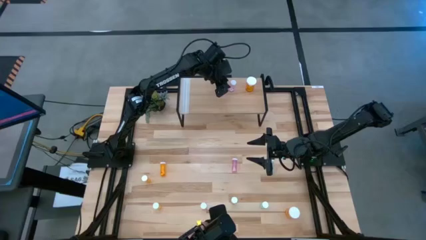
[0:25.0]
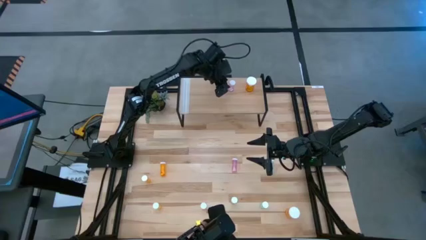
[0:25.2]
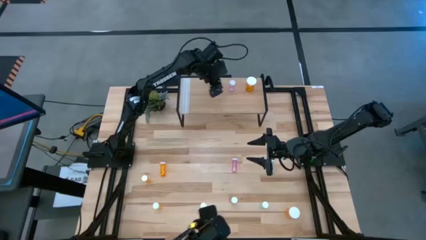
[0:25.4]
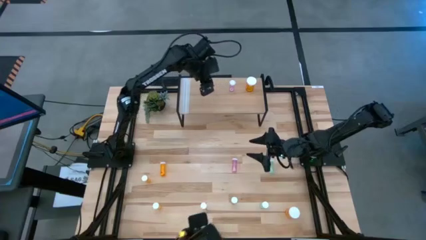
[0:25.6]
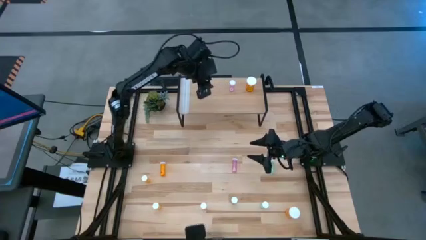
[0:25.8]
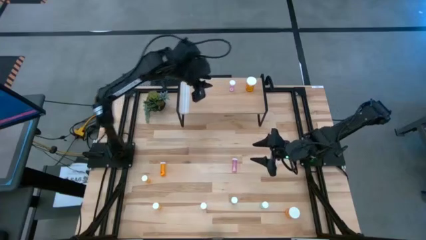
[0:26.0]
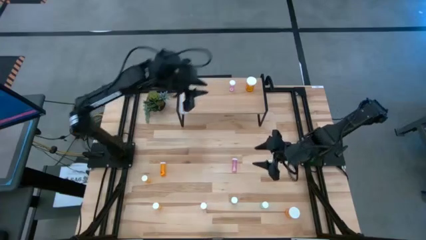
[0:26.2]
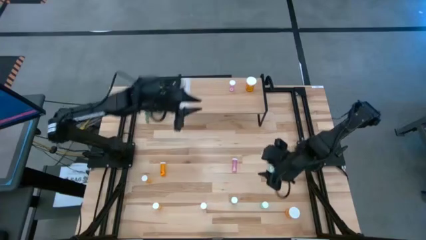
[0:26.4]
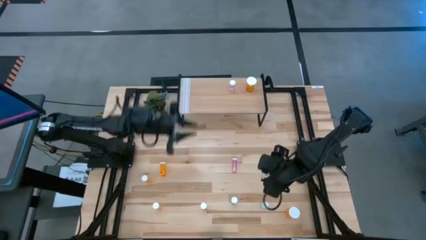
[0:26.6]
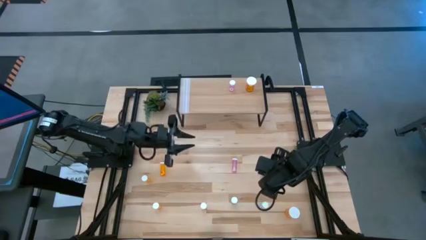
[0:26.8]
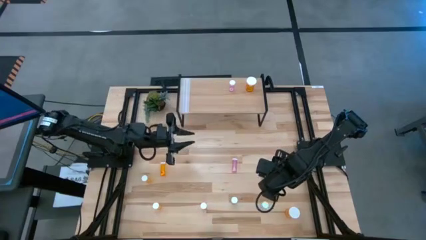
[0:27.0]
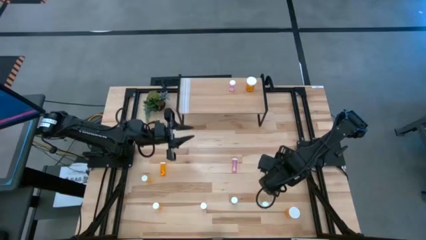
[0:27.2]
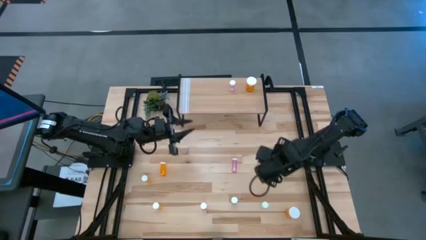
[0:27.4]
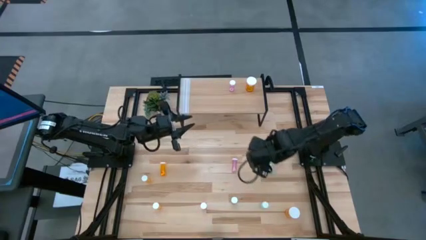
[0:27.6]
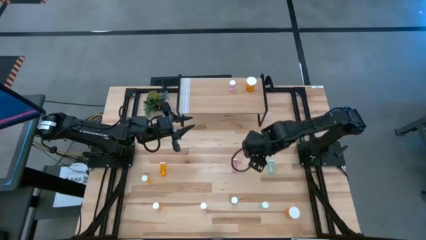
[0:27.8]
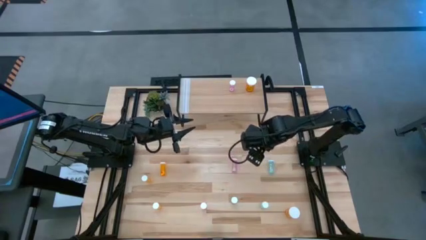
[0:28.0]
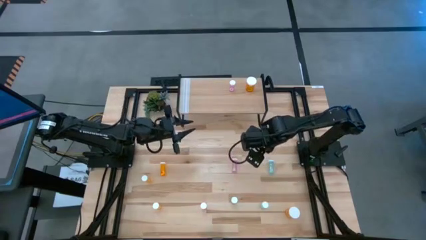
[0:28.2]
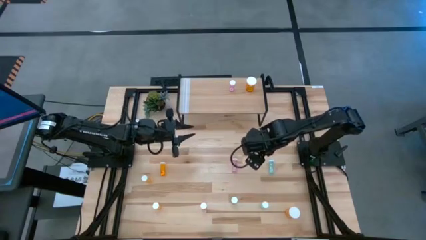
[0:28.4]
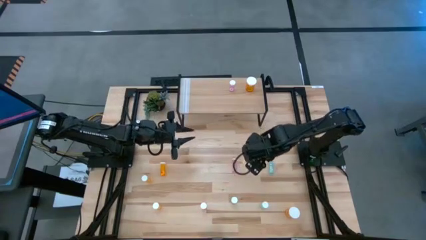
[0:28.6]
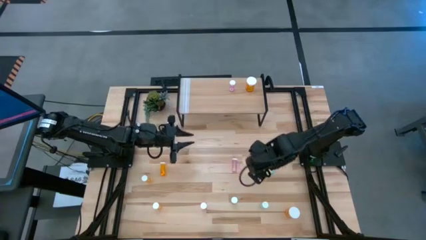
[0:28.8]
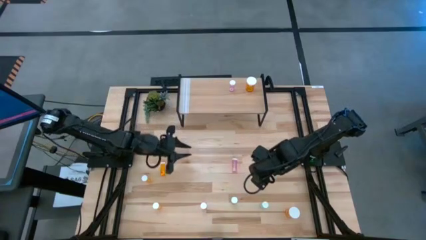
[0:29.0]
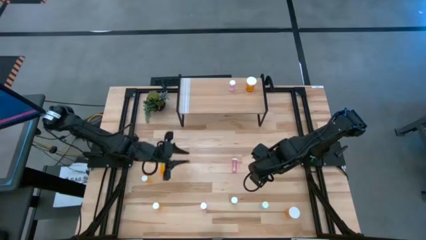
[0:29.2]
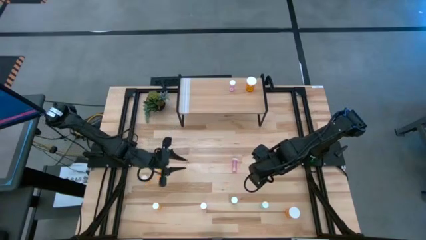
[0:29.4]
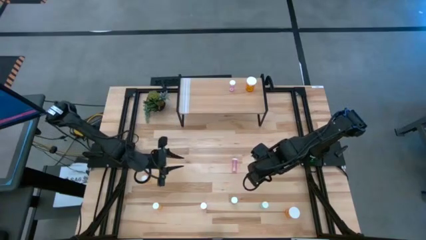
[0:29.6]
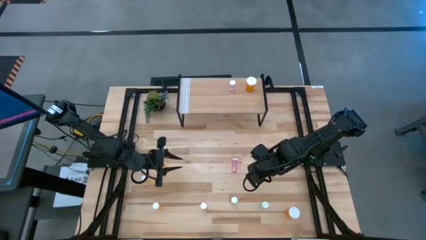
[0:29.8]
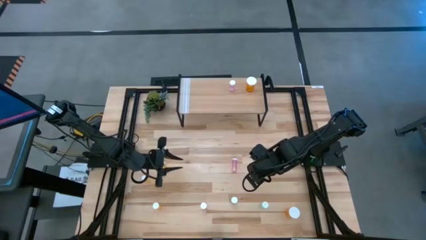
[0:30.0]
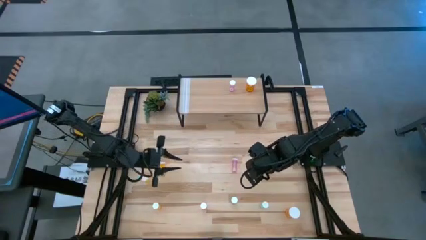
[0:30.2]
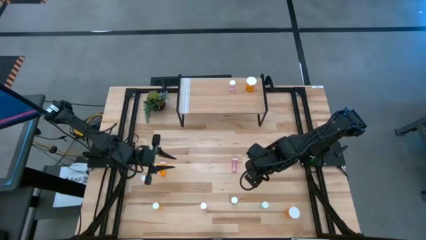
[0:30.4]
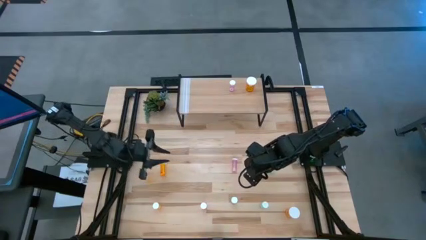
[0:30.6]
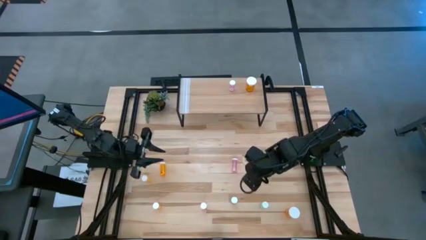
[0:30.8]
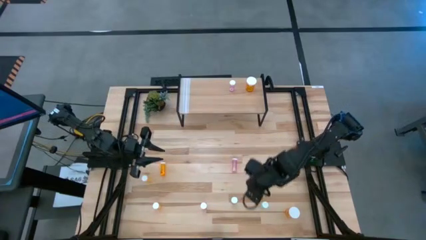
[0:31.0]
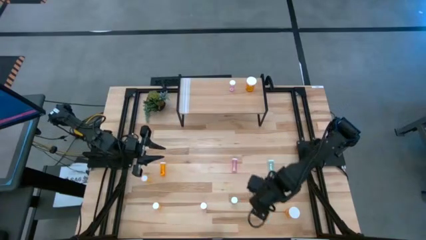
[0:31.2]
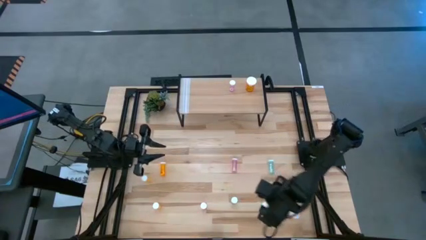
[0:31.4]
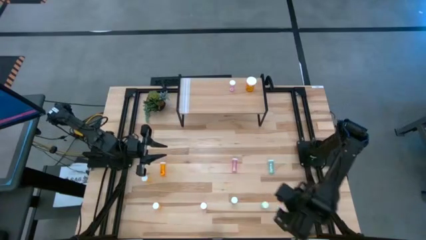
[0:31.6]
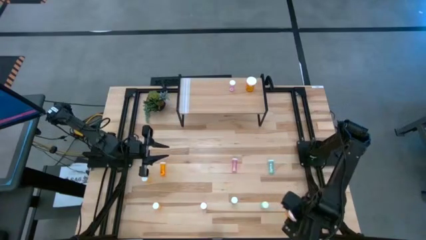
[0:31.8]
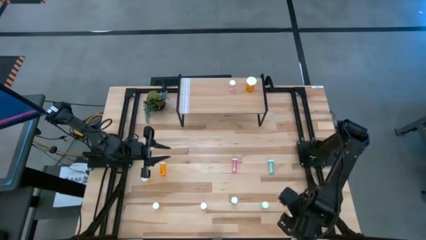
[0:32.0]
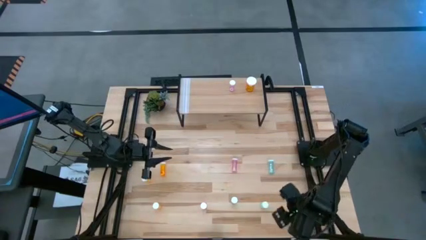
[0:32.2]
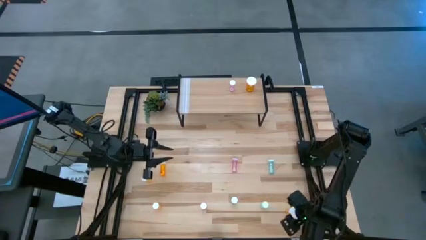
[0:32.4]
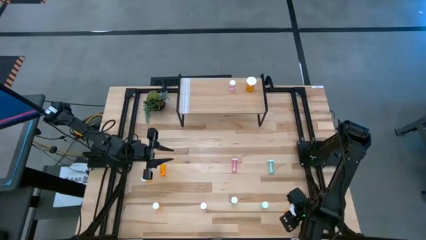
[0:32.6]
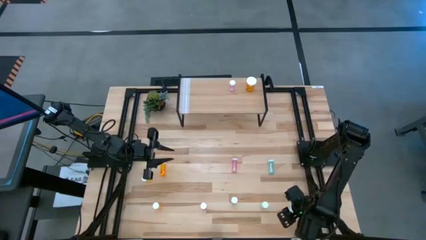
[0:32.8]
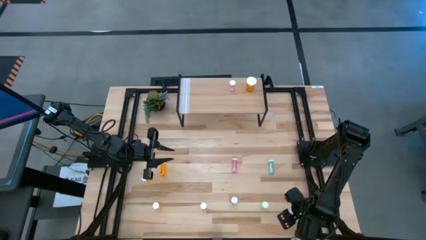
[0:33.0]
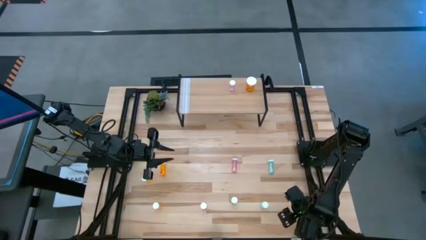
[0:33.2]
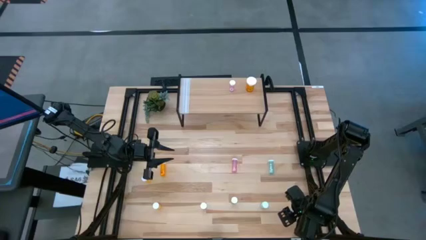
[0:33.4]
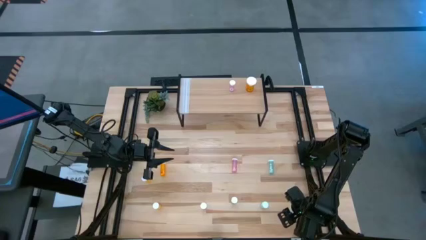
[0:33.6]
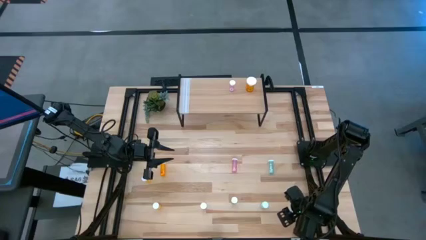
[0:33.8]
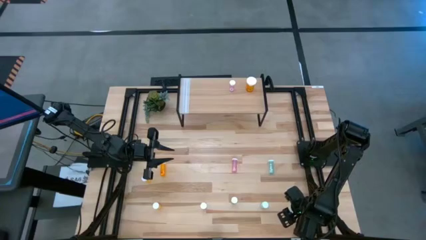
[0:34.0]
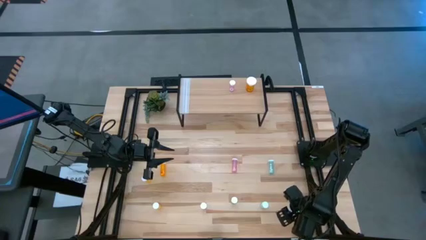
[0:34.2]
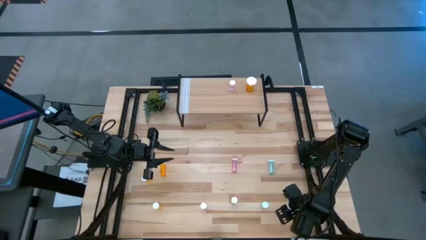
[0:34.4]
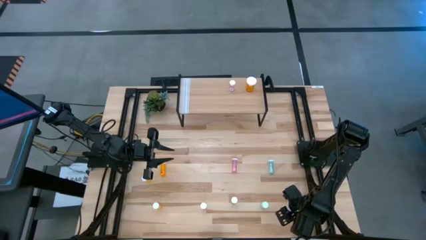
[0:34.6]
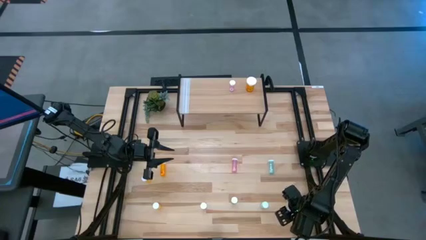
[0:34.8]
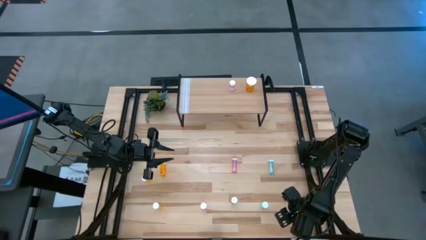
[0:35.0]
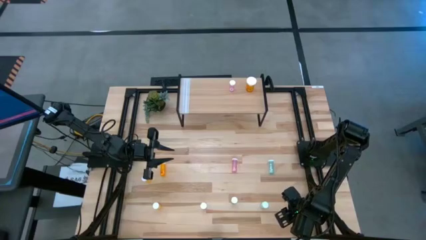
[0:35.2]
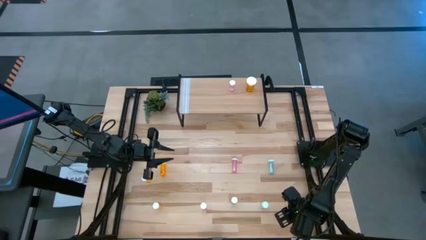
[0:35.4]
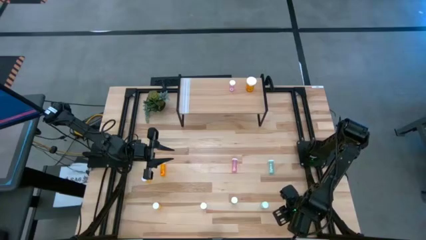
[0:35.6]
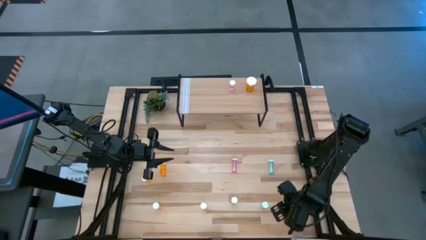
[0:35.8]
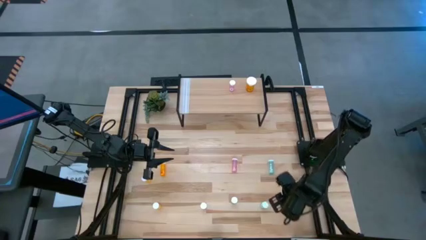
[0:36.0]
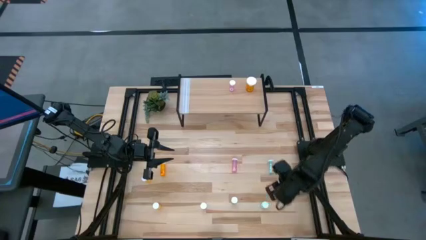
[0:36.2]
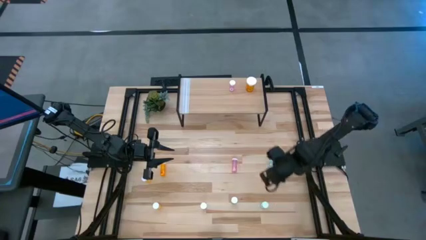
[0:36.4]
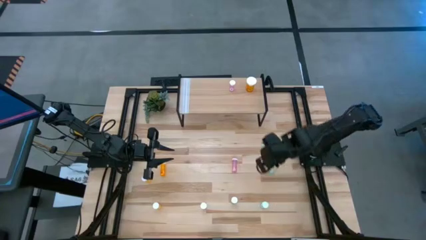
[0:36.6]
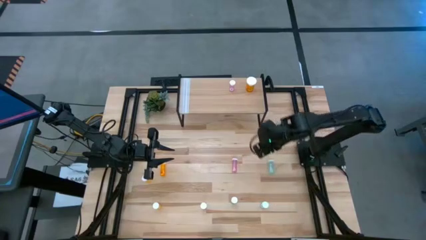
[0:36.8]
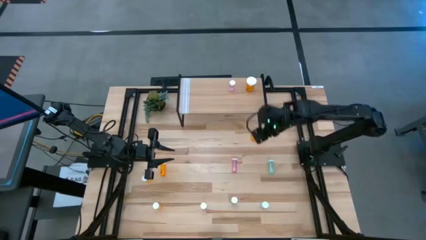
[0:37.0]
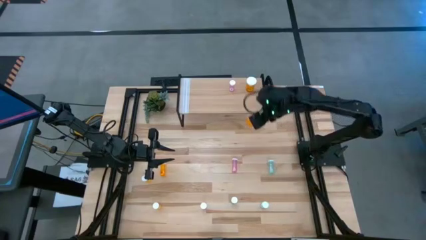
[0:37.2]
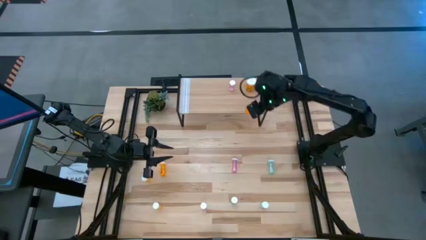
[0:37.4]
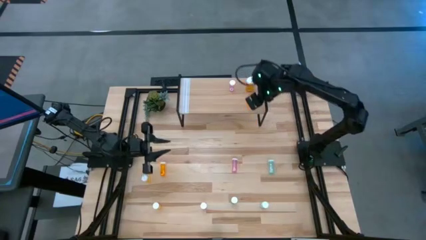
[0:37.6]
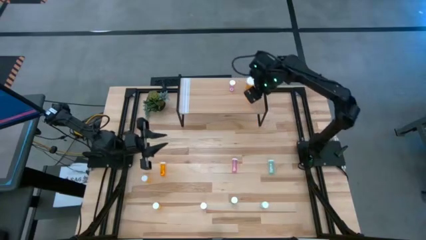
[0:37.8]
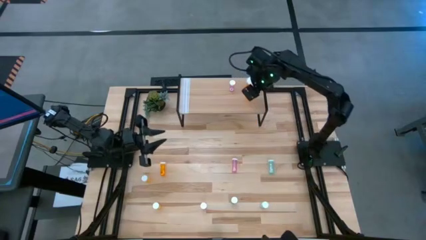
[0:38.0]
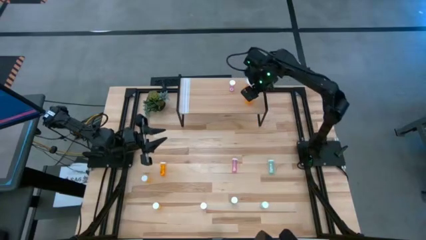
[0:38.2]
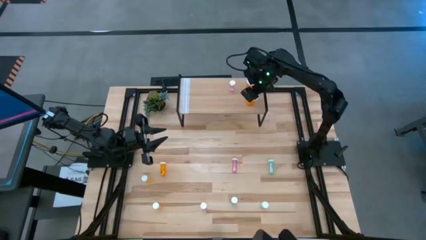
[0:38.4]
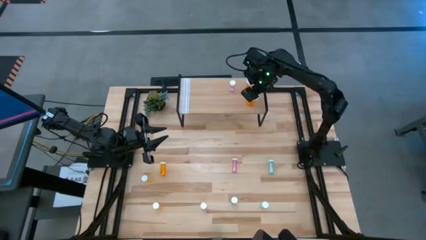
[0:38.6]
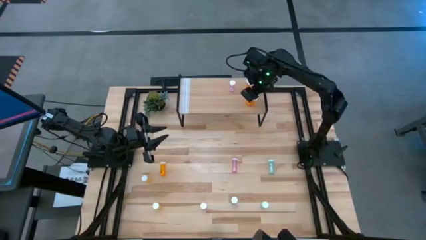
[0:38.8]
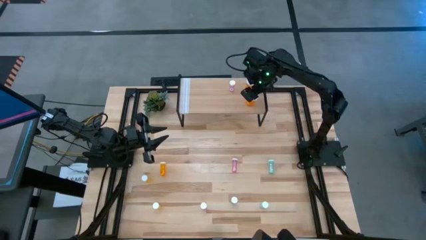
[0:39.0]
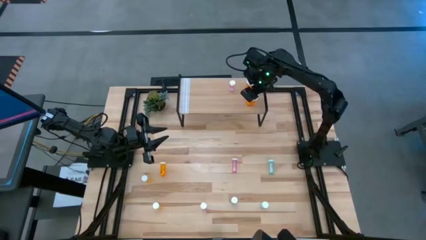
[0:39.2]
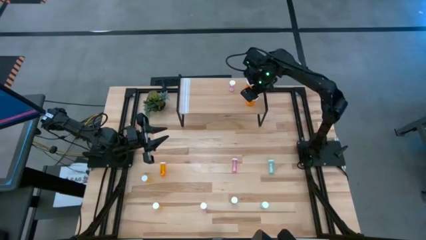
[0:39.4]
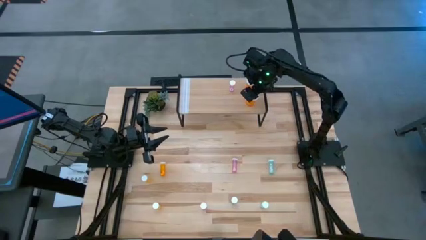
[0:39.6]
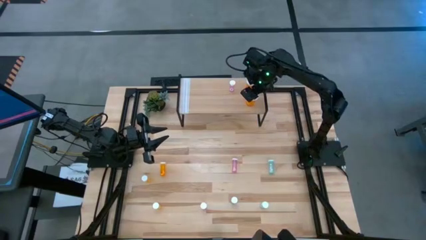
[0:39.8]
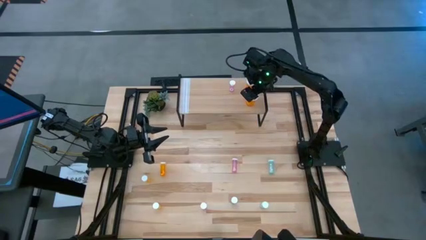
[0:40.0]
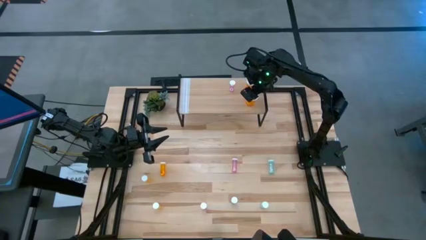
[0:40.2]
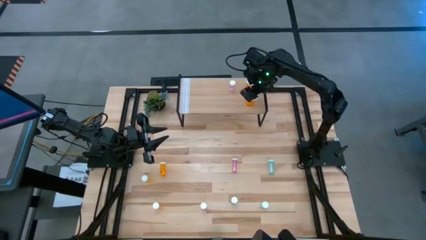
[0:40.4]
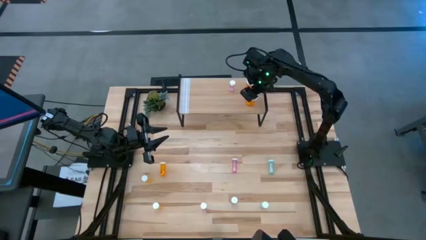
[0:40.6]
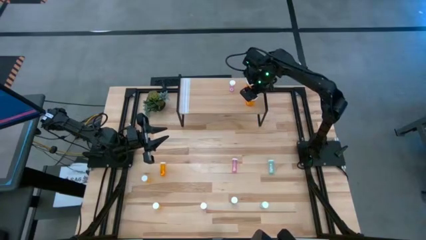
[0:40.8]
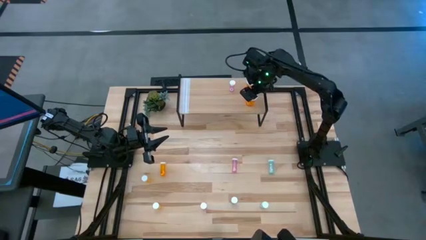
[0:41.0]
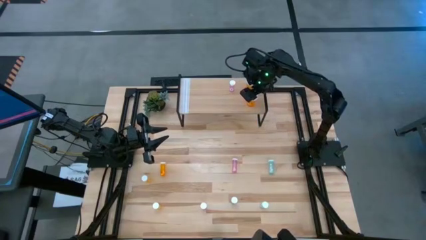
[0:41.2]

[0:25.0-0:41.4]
Task: Pick and place medicine bottles onto shelf by color
Put the large orange pill bottle on the shelf aligned with the other large orange pill bottle
